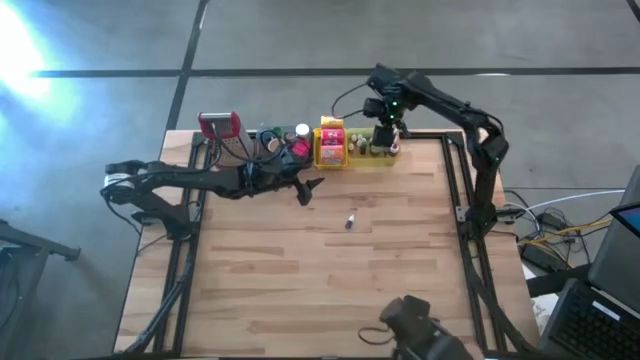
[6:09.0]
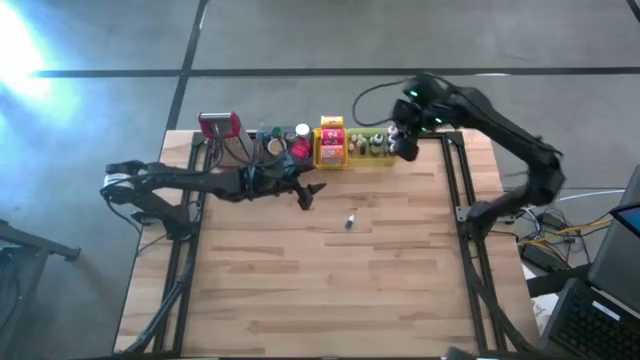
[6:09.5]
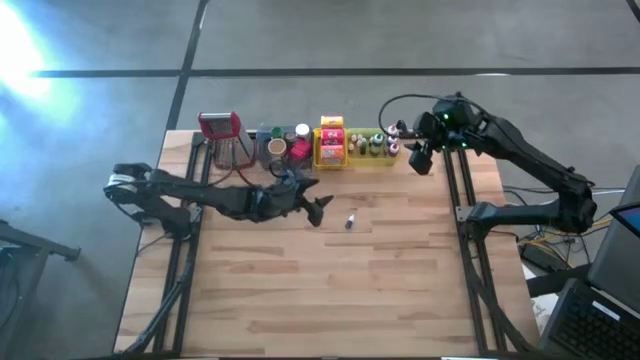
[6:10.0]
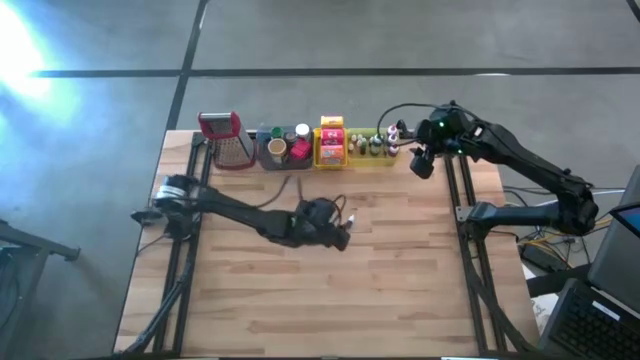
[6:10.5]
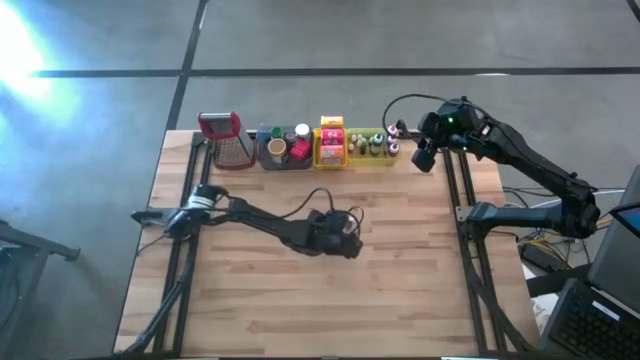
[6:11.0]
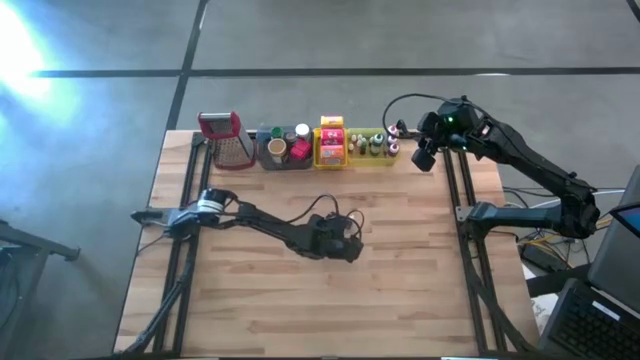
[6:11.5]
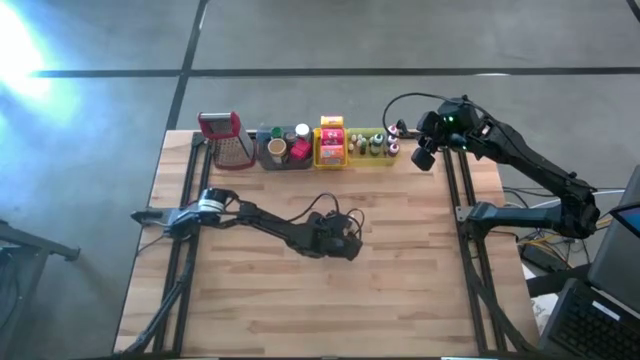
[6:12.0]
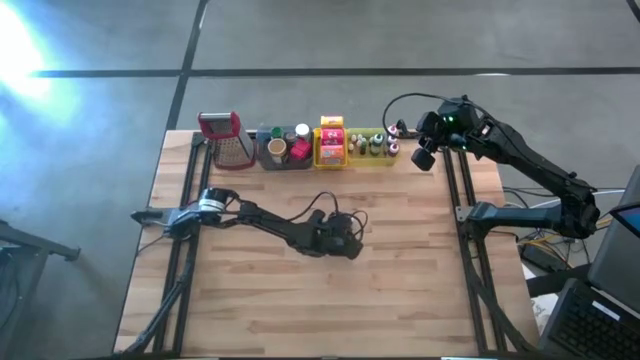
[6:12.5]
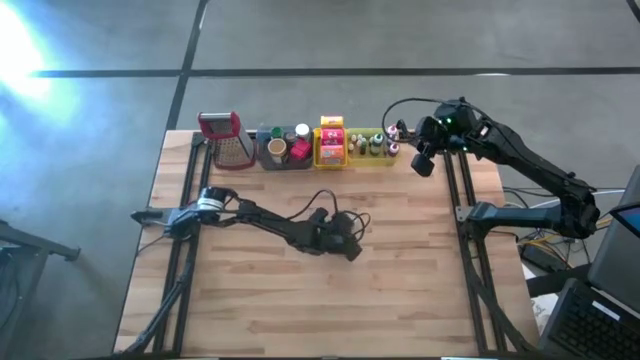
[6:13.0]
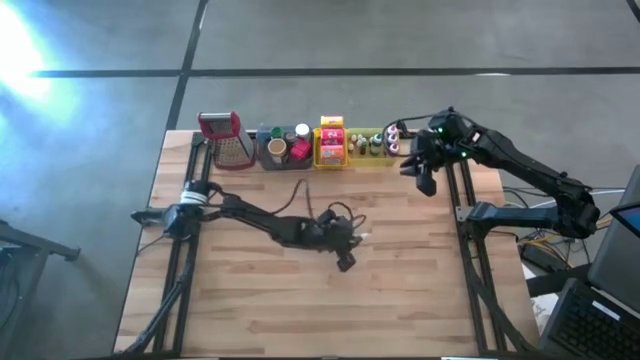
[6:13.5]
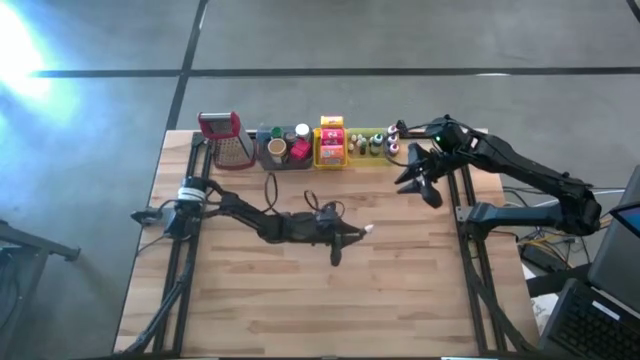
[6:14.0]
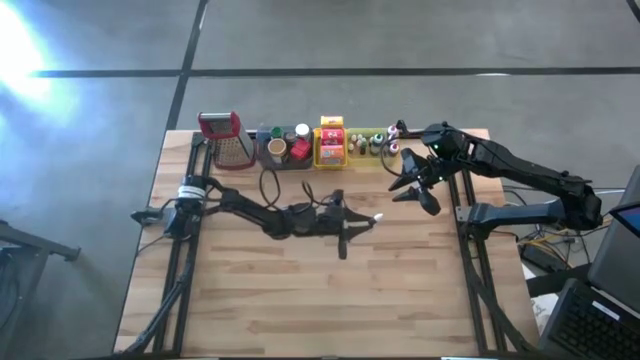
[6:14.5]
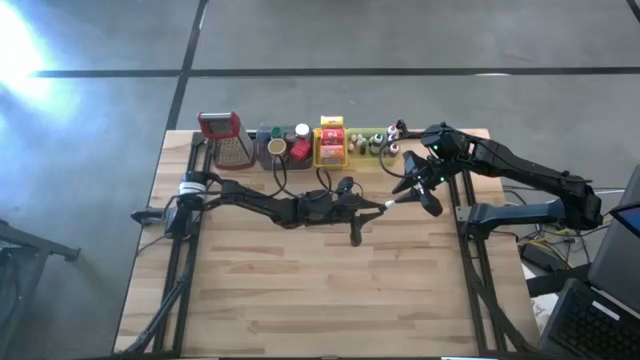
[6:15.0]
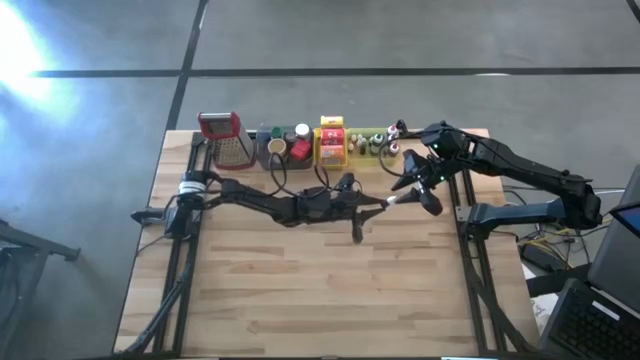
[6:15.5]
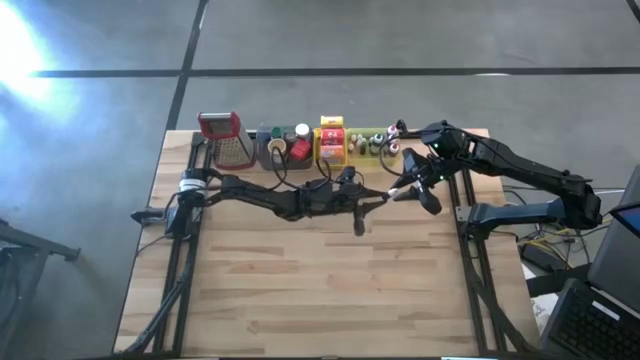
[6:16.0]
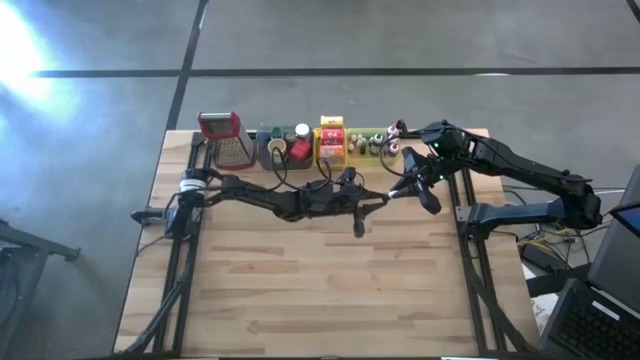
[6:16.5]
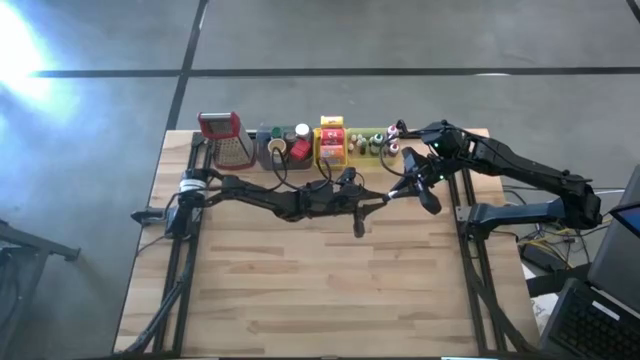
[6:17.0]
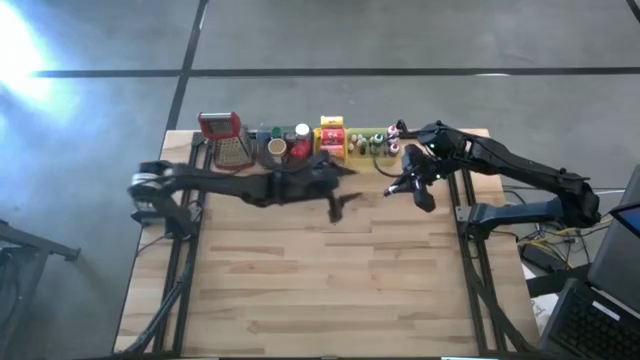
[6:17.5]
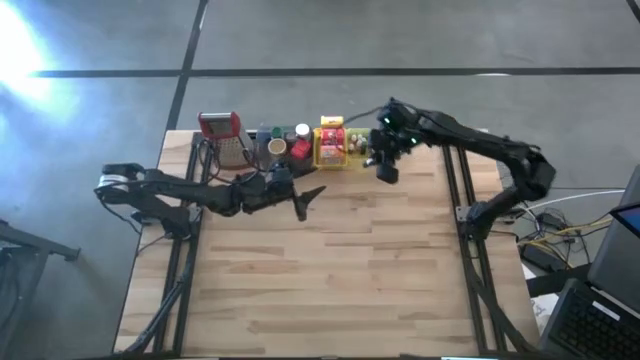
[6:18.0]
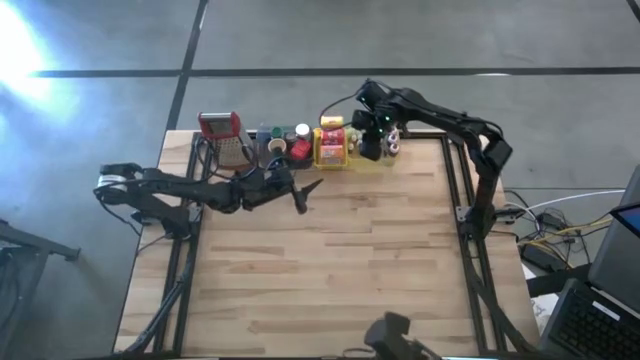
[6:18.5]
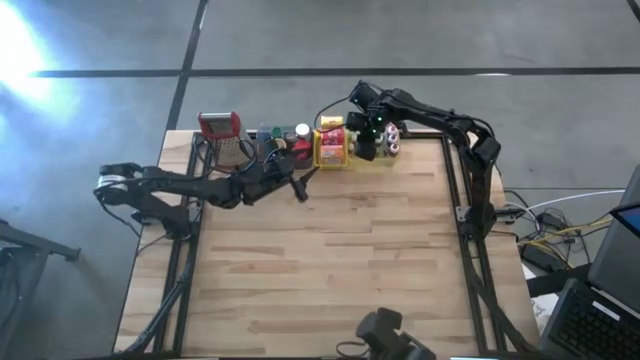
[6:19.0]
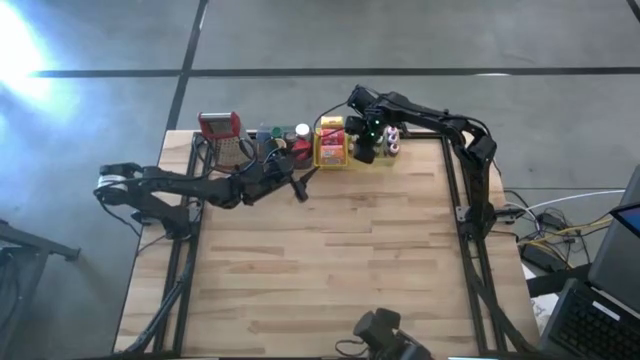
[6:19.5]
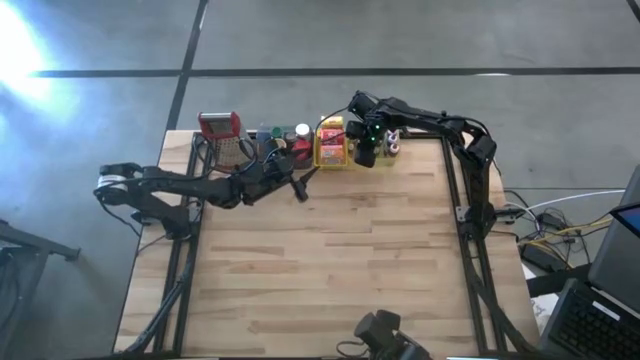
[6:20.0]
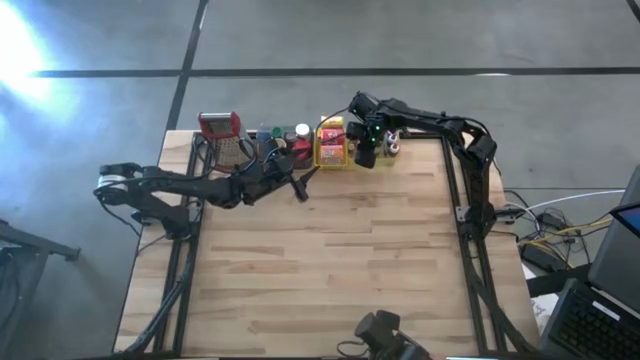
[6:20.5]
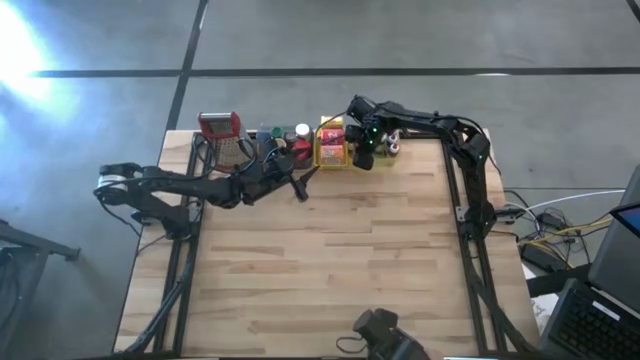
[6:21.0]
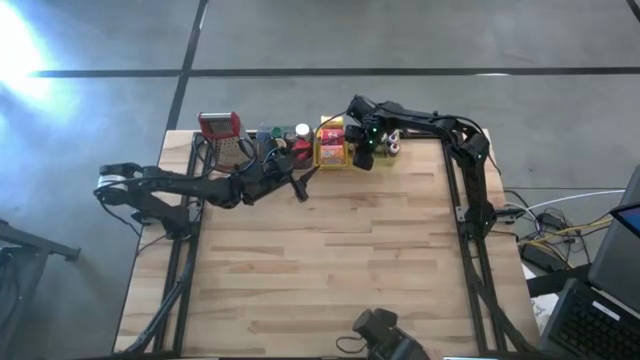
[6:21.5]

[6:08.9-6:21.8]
Task: Pick & Place Kitchen Items
Put the black food coloring bottle into the light yellow bin

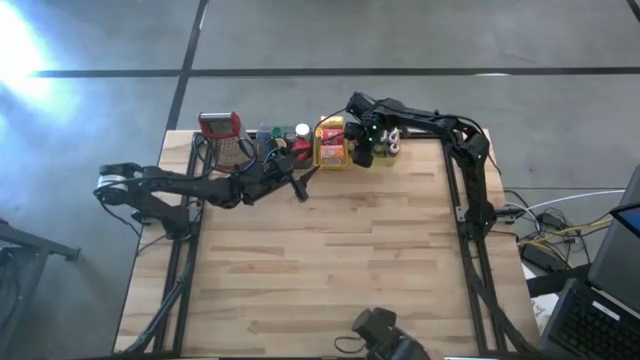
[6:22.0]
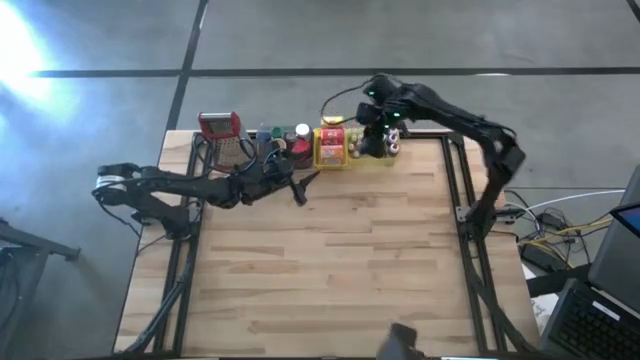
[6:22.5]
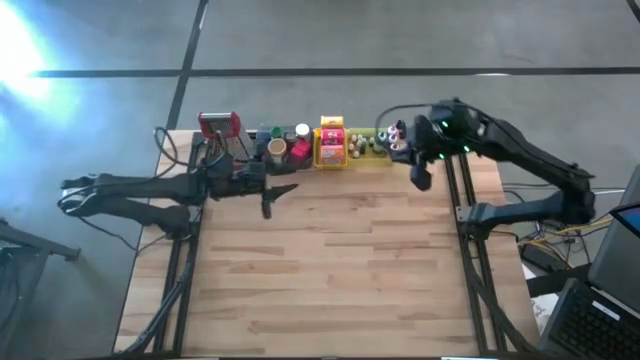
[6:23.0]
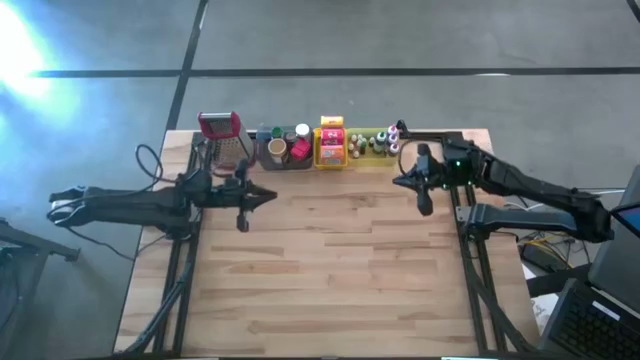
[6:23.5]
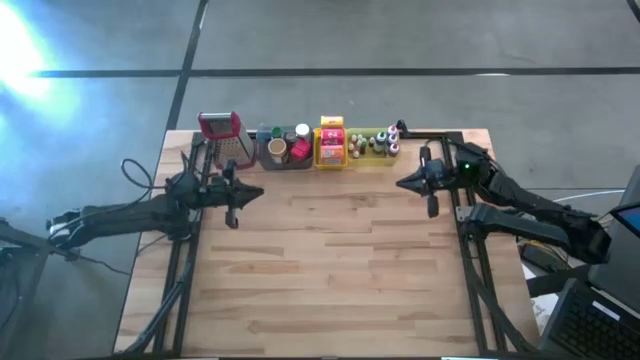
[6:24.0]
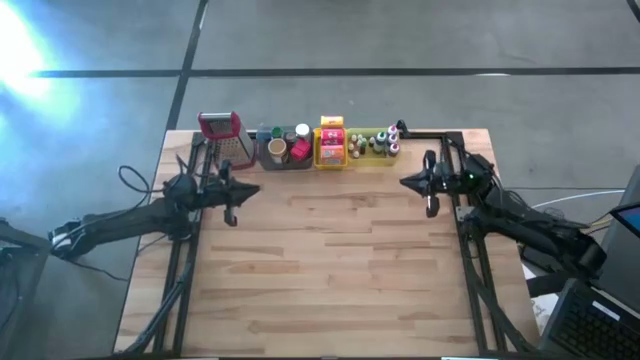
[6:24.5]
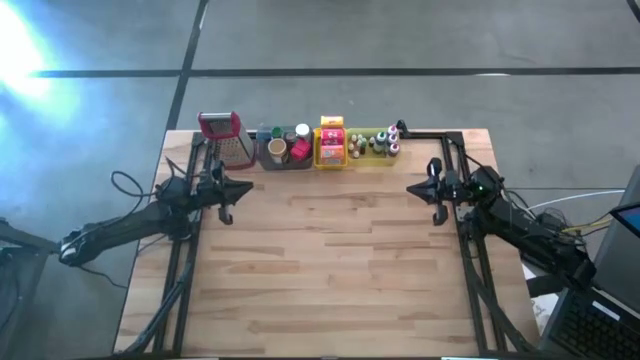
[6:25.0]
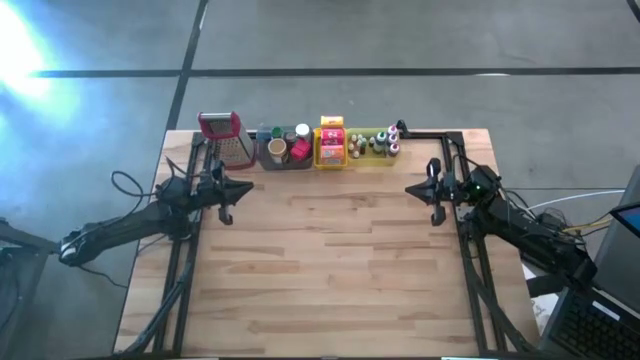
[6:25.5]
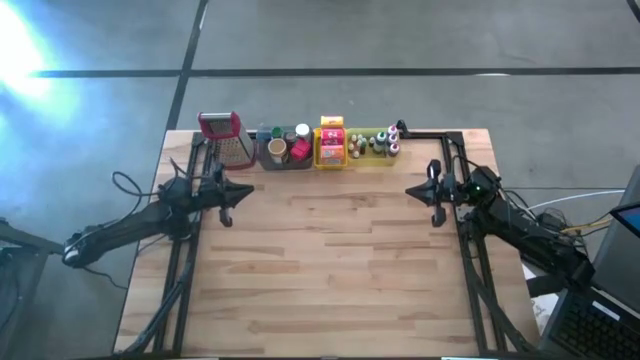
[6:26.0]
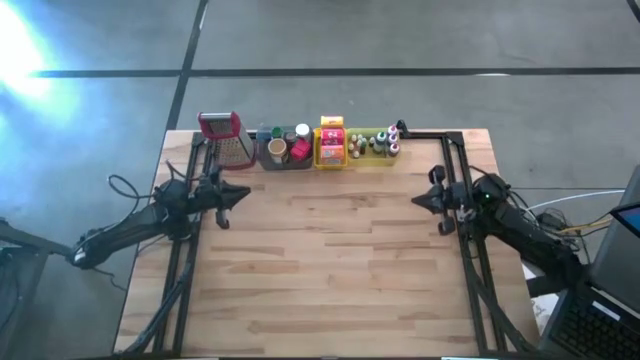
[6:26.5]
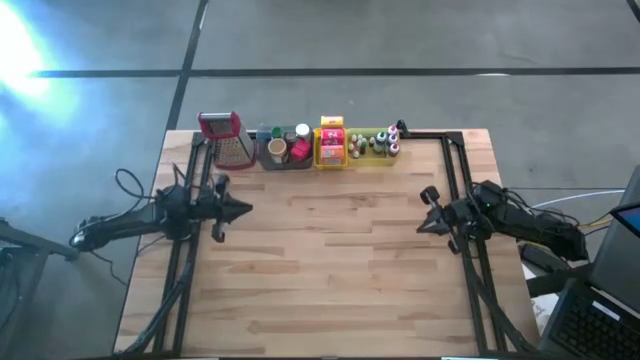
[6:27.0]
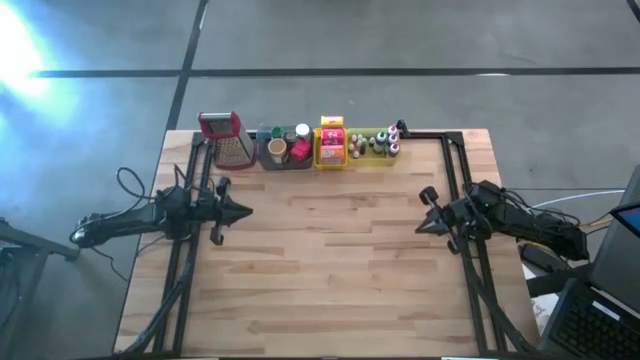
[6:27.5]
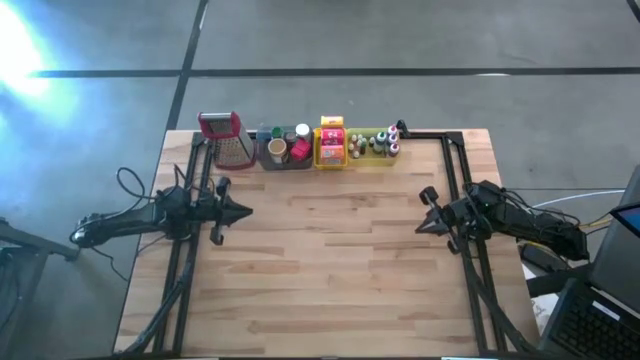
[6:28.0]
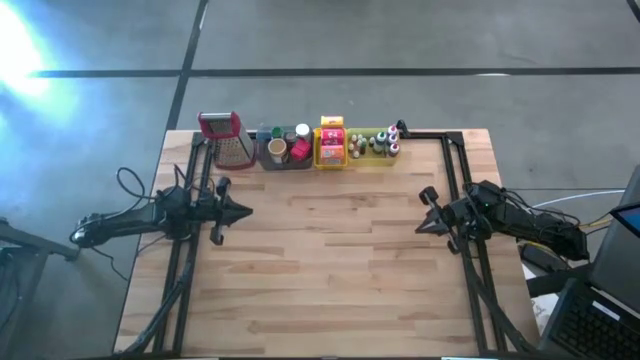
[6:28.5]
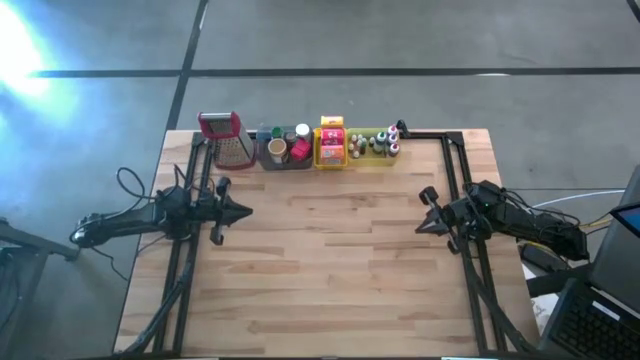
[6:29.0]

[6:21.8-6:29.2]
Return to Home Position
